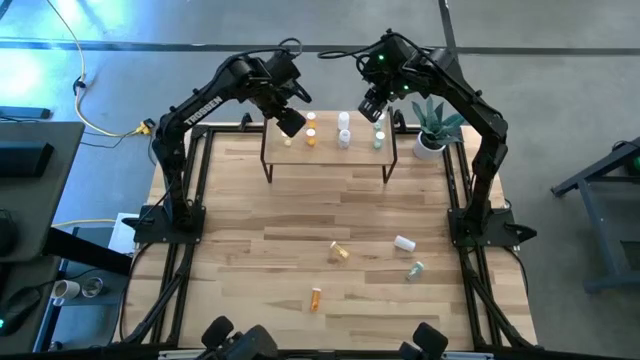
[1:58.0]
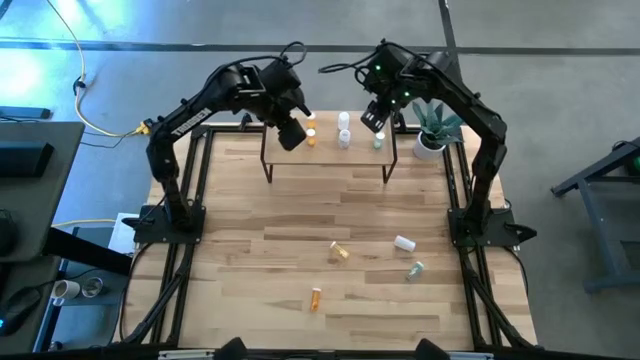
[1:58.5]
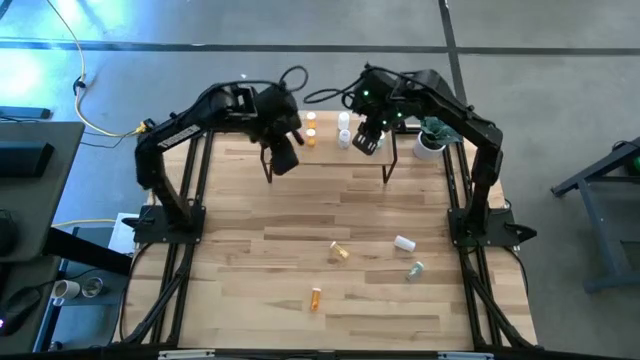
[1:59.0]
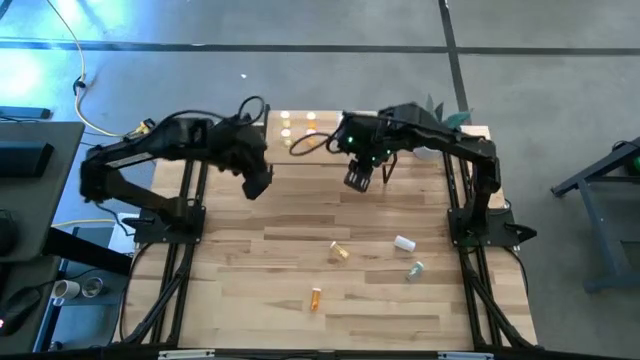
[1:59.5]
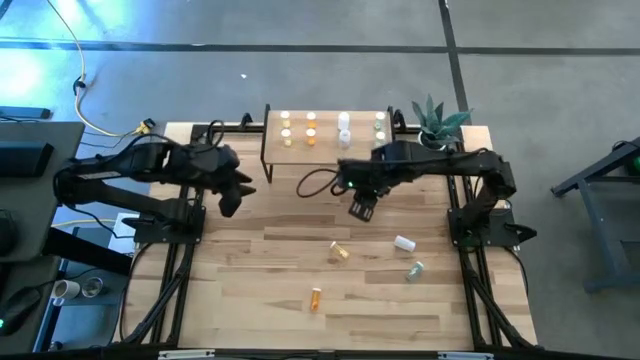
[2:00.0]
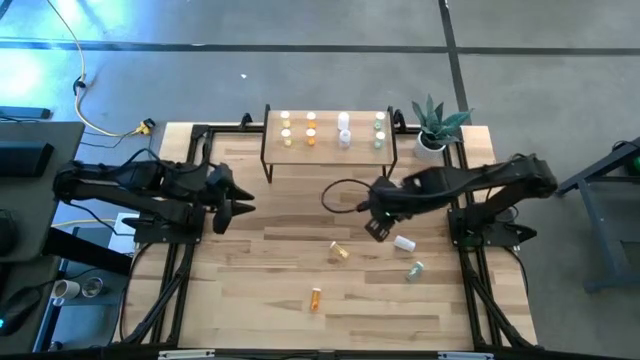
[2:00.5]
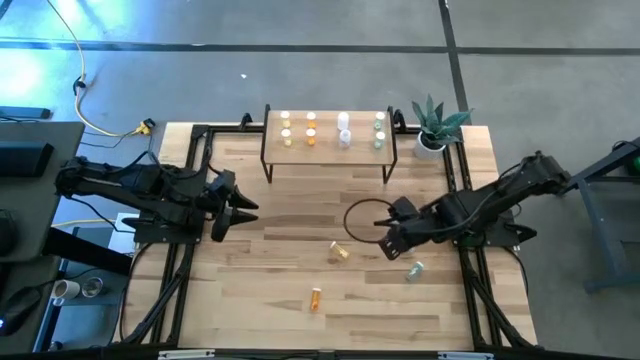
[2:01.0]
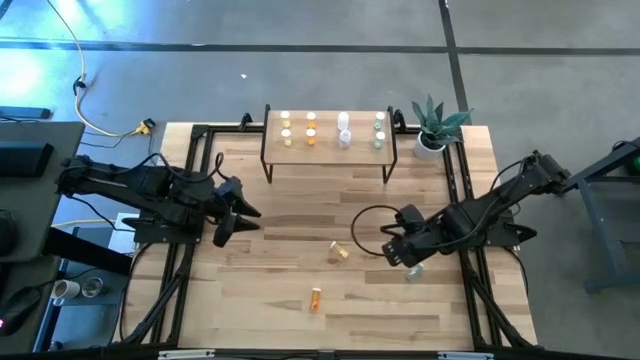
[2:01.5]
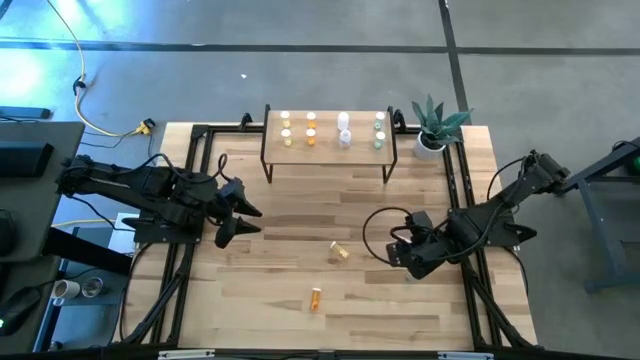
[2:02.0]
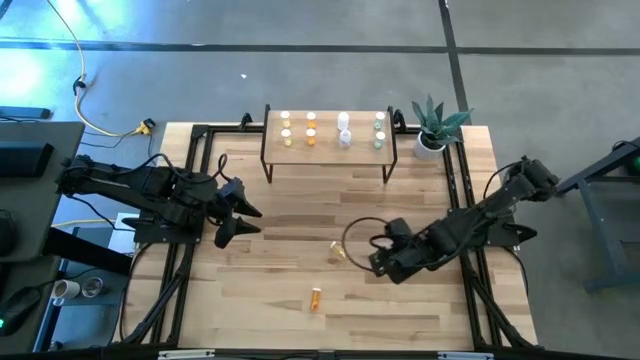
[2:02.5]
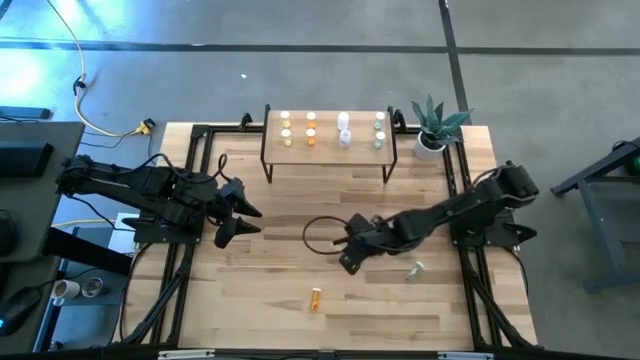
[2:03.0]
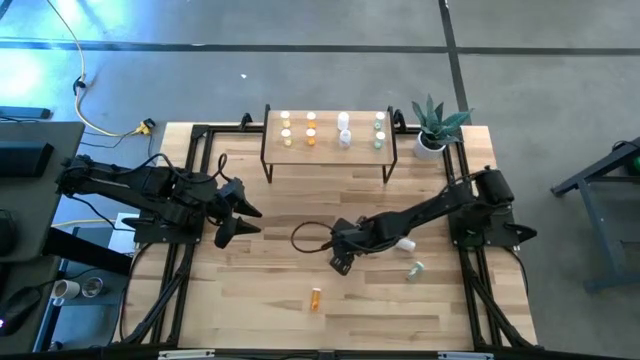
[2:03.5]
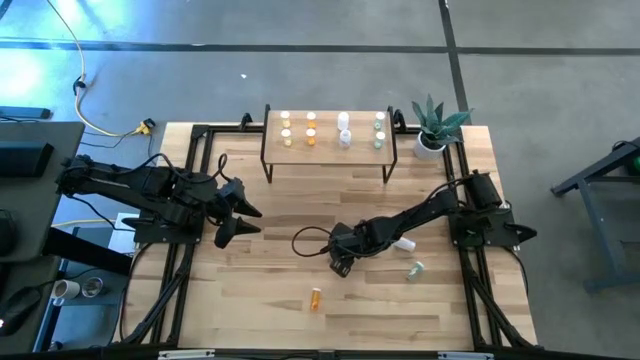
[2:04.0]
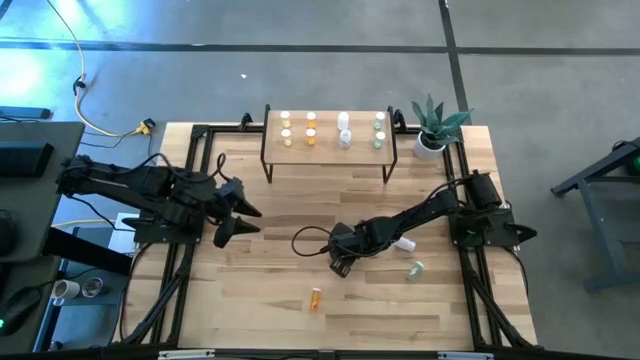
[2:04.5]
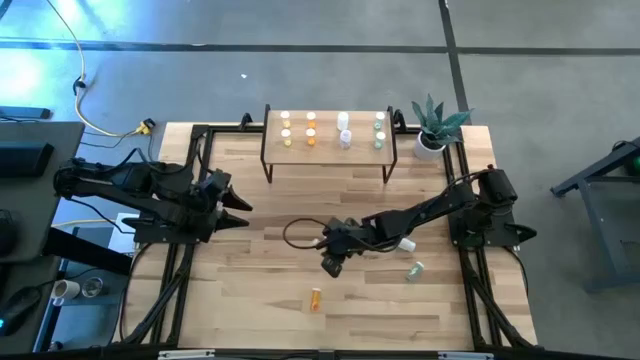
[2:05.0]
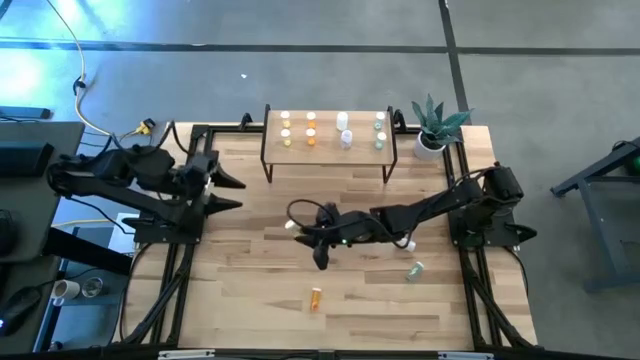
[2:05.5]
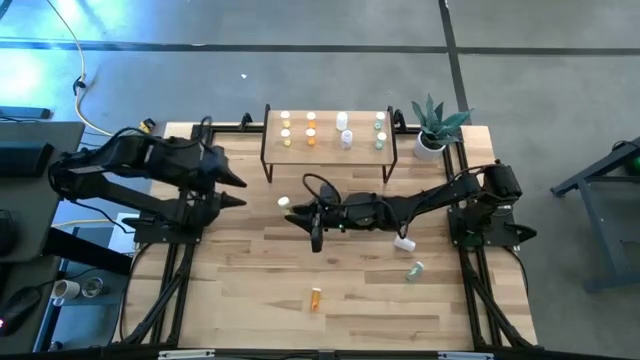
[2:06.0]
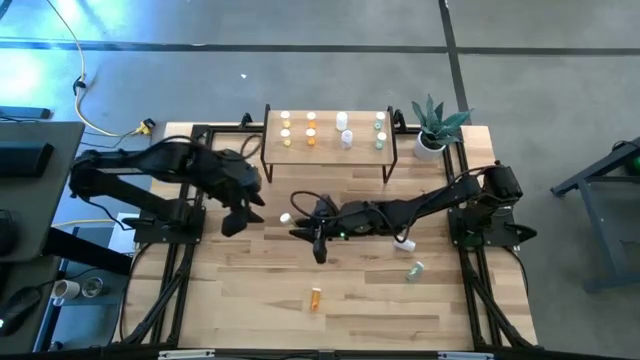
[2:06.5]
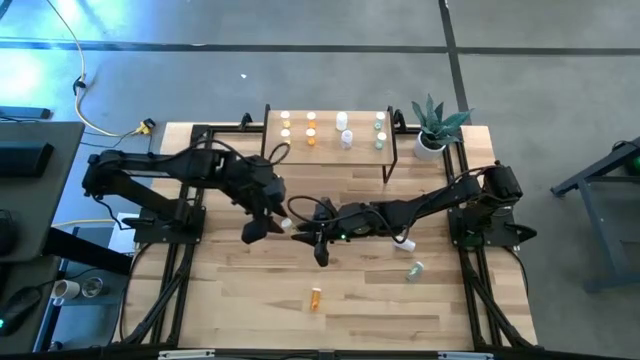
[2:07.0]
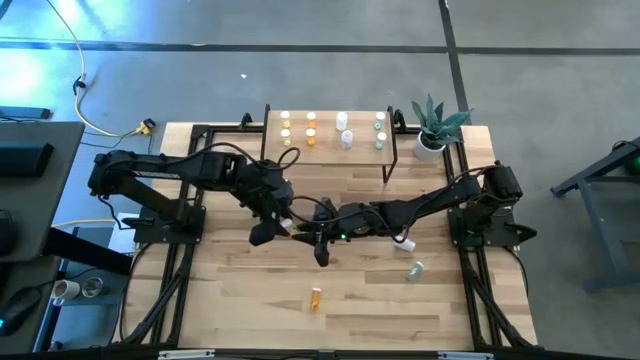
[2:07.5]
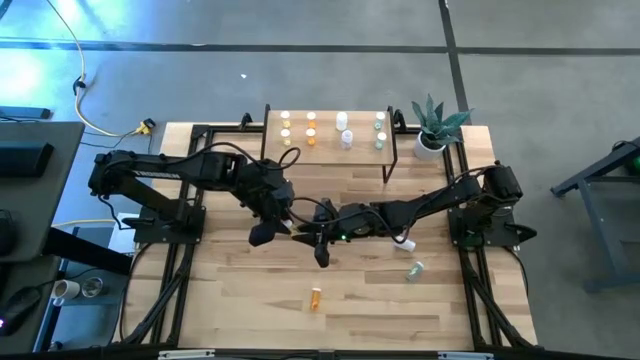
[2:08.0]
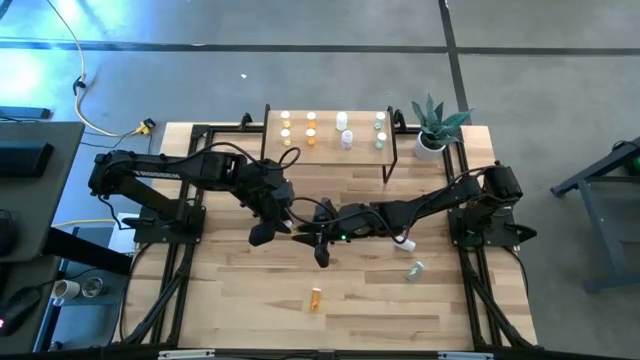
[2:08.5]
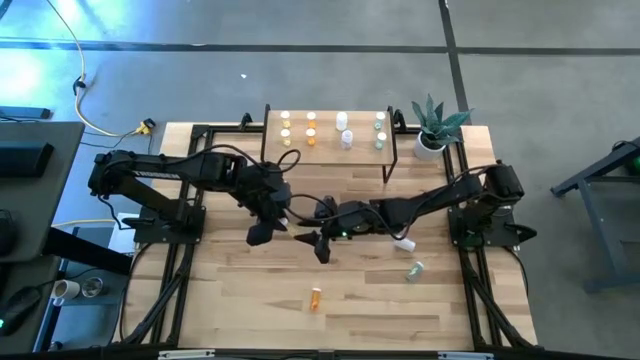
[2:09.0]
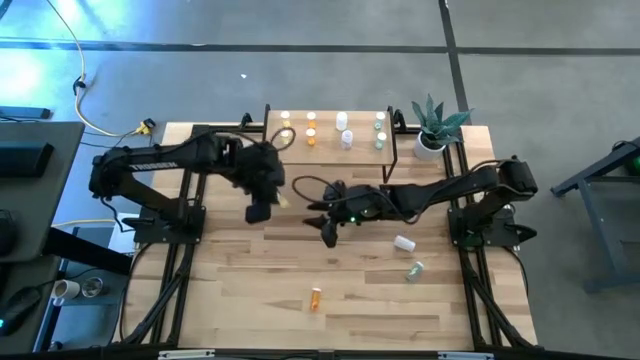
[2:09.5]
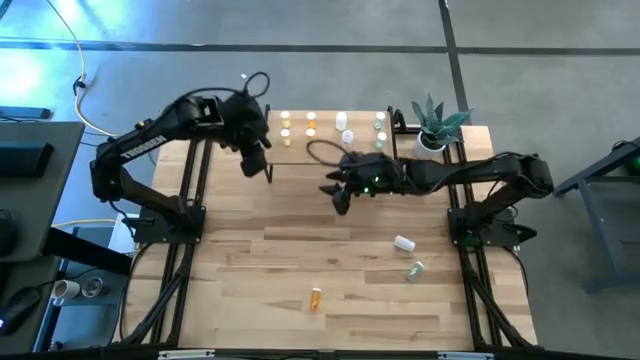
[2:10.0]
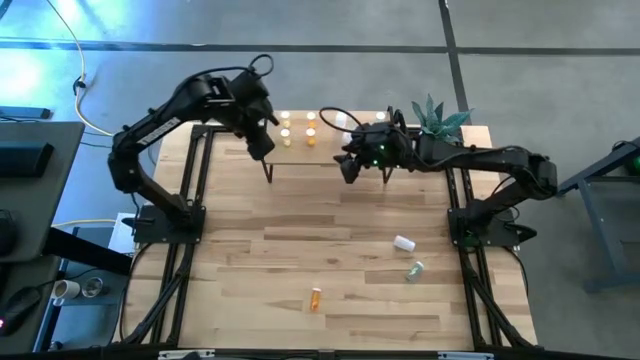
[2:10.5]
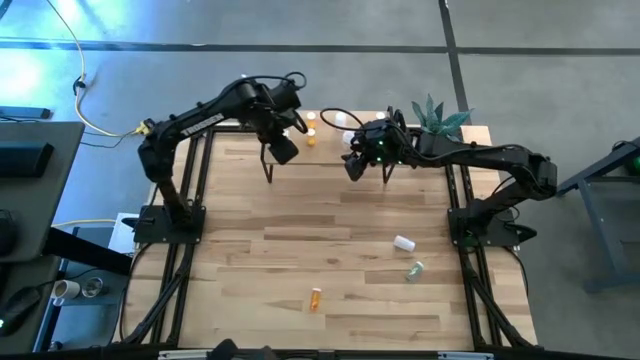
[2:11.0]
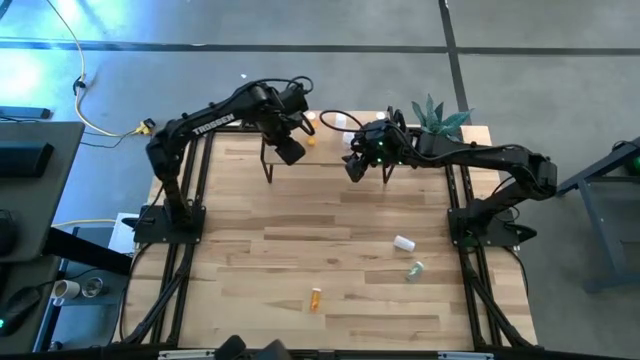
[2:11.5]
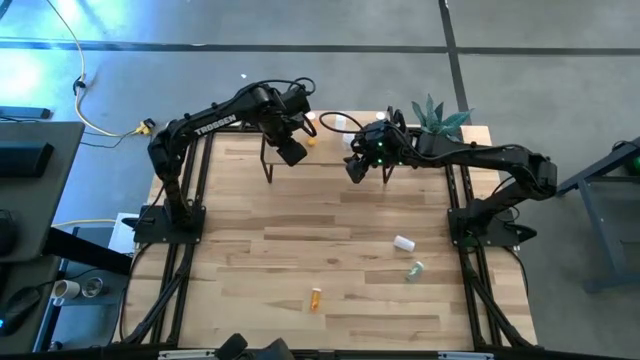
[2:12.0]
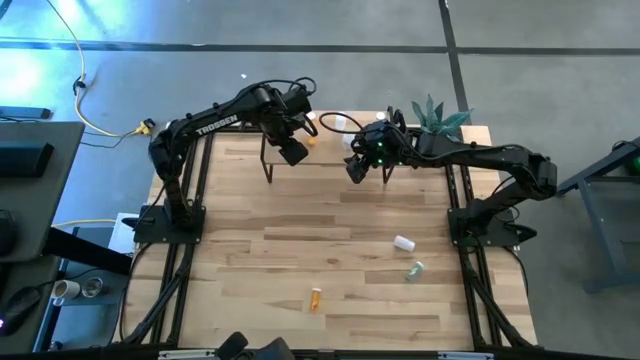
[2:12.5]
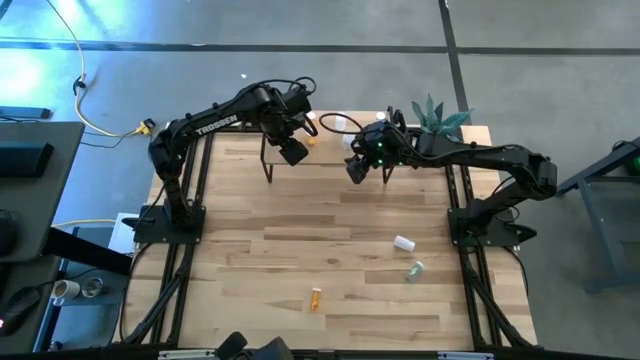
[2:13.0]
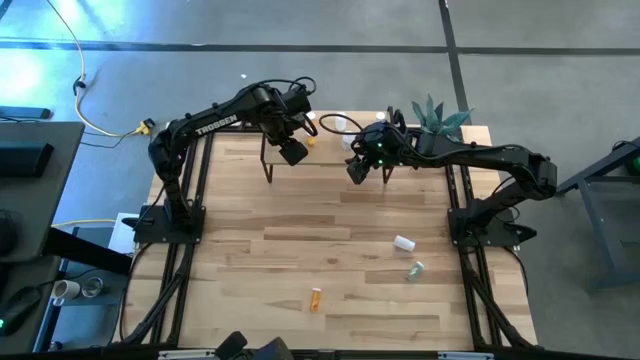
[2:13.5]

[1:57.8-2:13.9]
Task: Pick and place medicine bottles onto shelf by color
Put the yellow pill bottle on the shelf and align it to the other yellow pill bottle

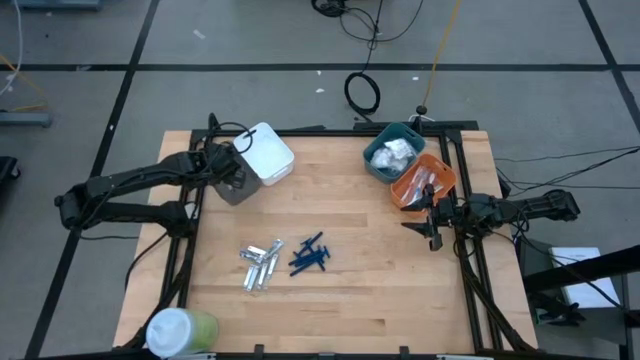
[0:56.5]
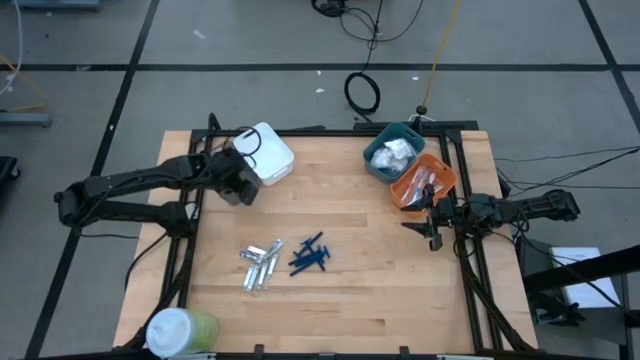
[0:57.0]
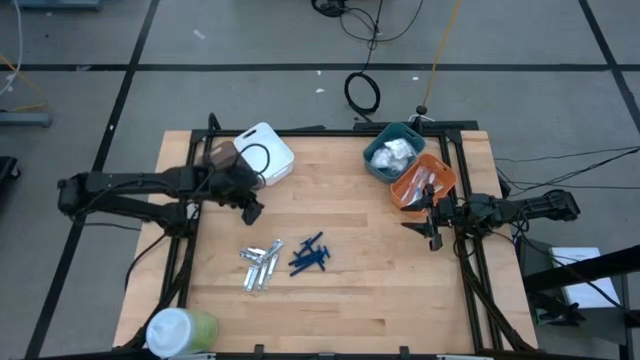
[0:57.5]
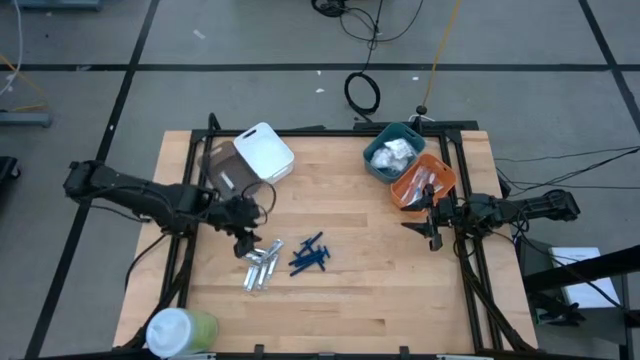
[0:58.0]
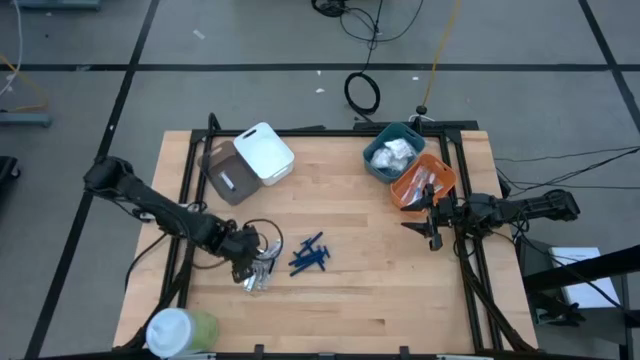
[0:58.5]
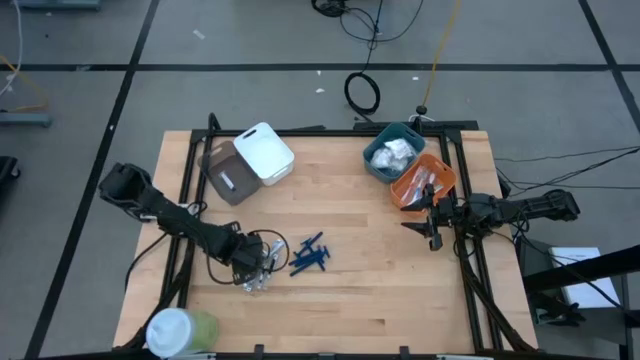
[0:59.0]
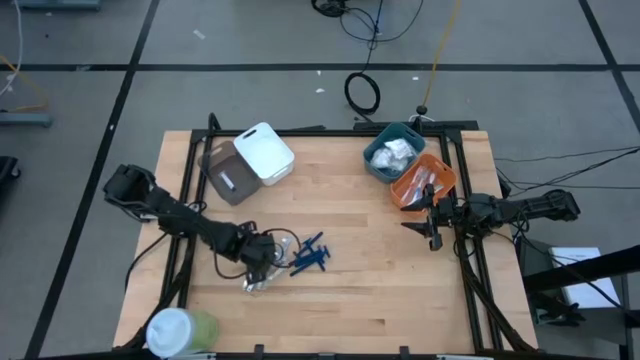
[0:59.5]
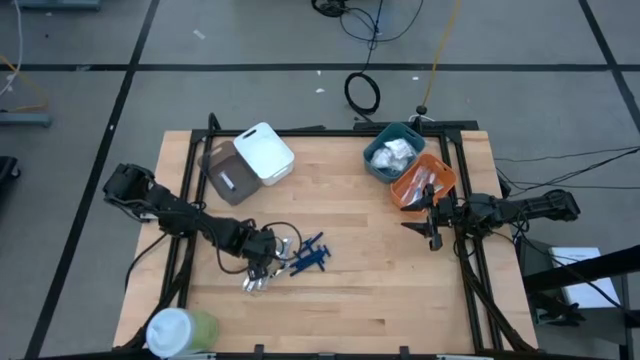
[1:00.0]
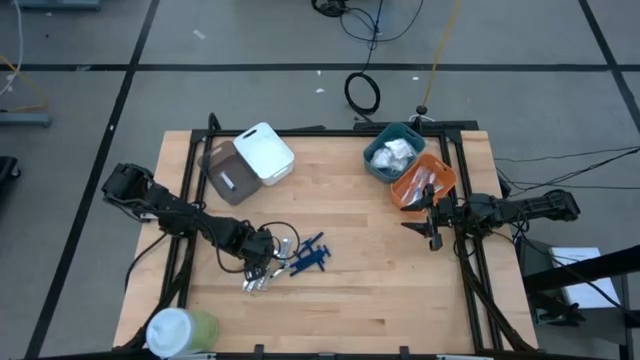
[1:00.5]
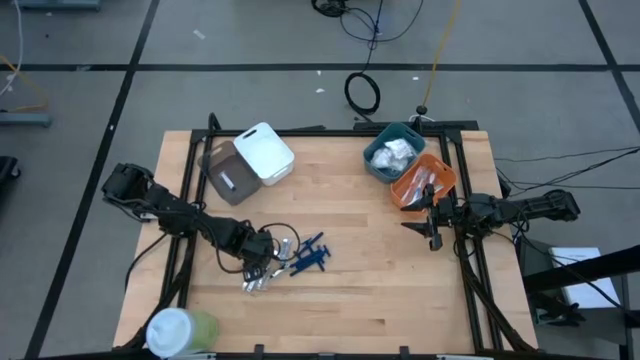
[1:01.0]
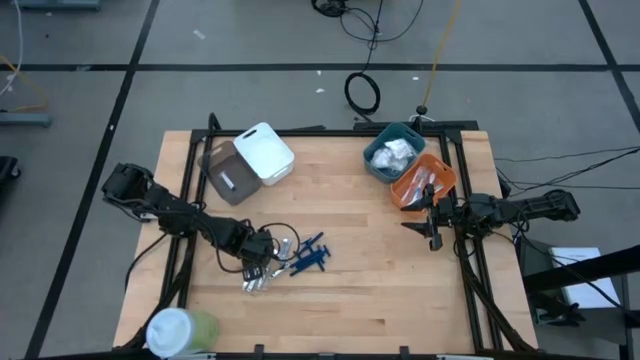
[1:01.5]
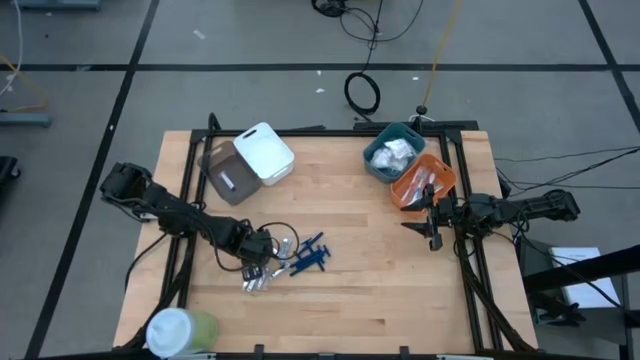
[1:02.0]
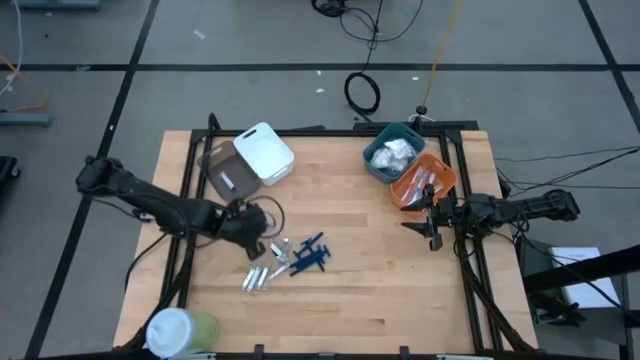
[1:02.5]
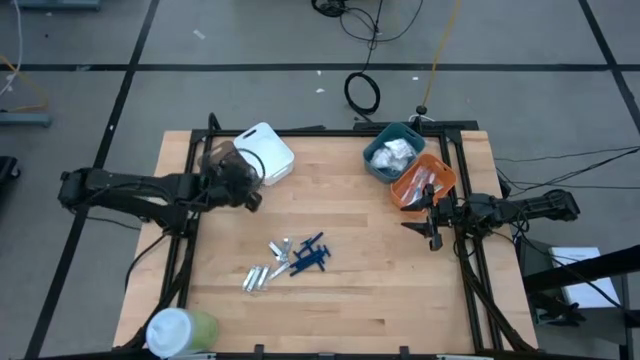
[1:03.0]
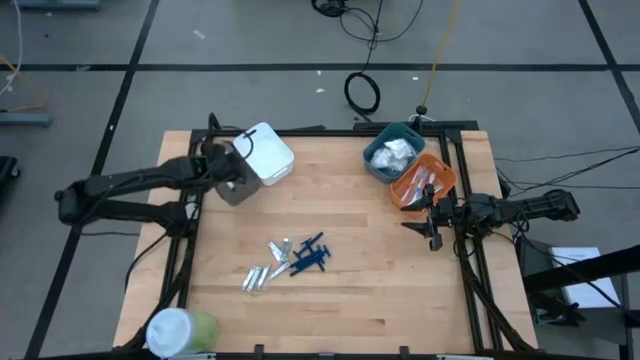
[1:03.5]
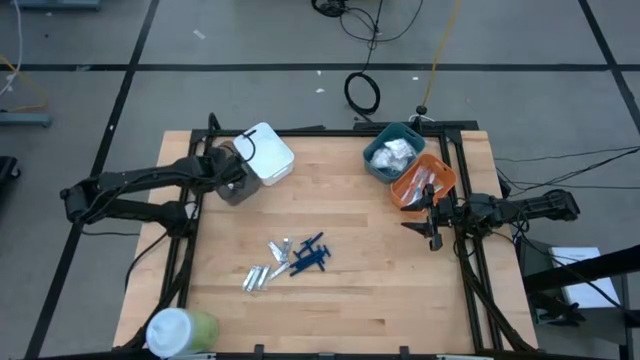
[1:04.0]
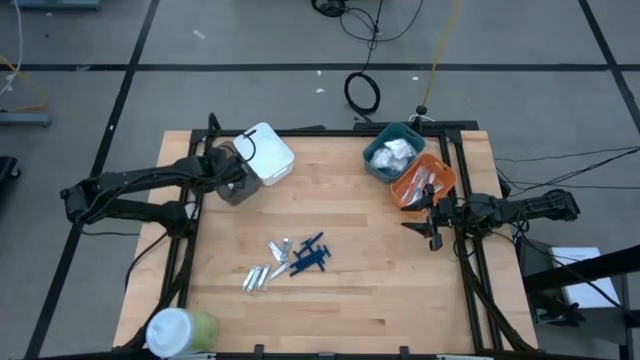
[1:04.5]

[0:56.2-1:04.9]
Task: Pick & Place Travel size toiletries
Put the silver nail cutter into the black bin
